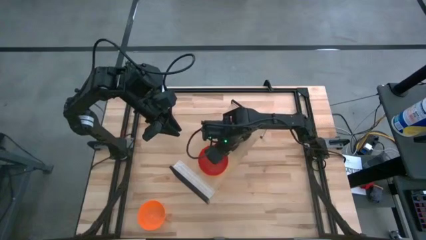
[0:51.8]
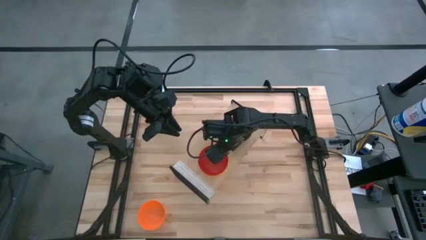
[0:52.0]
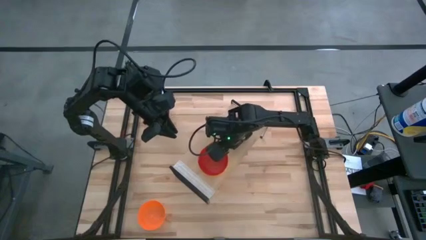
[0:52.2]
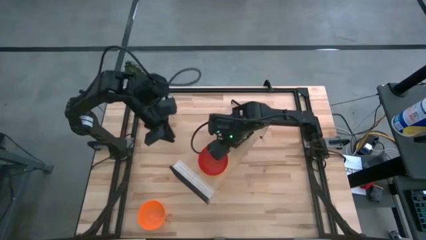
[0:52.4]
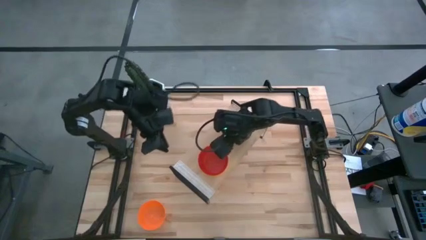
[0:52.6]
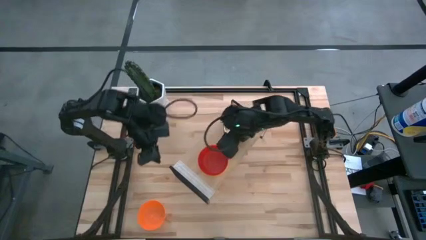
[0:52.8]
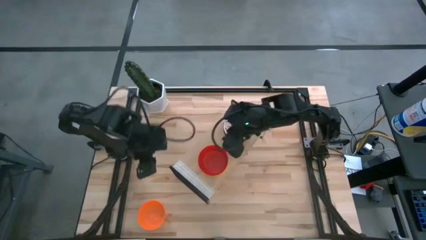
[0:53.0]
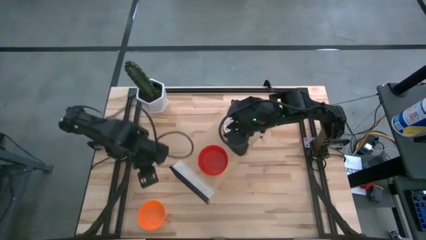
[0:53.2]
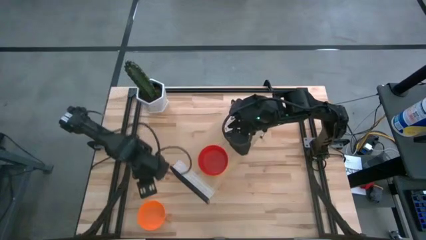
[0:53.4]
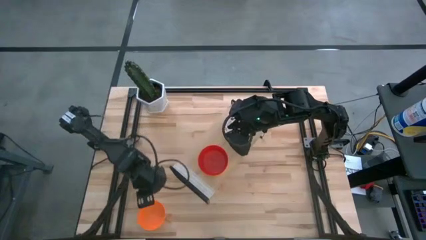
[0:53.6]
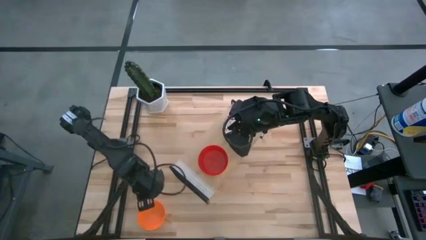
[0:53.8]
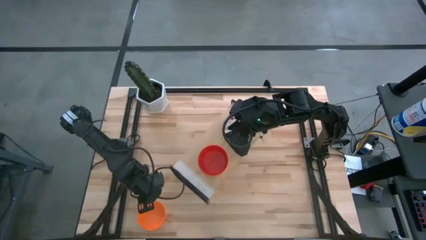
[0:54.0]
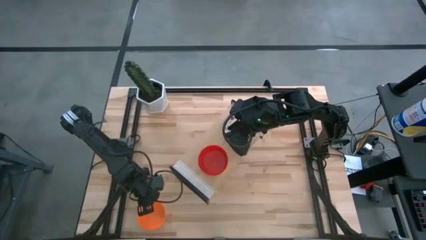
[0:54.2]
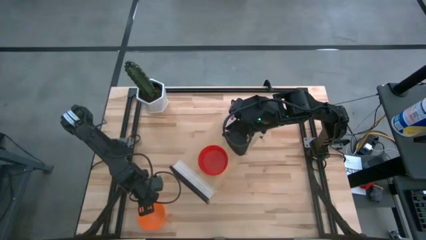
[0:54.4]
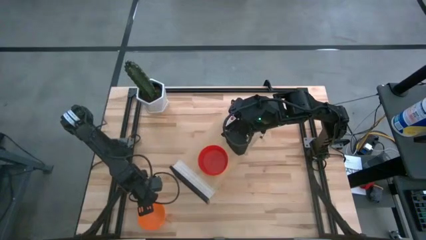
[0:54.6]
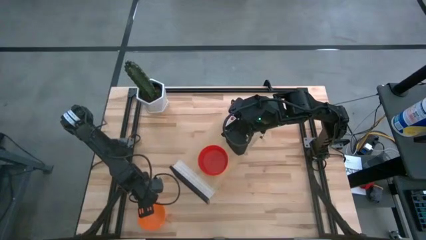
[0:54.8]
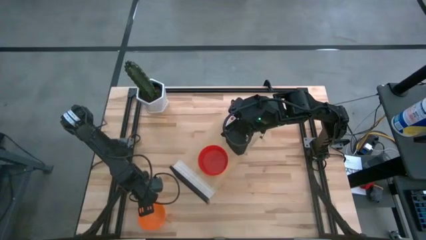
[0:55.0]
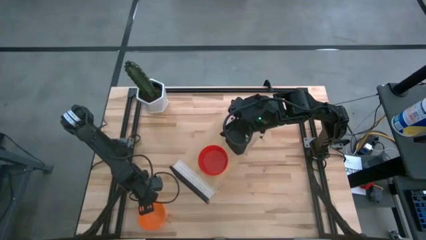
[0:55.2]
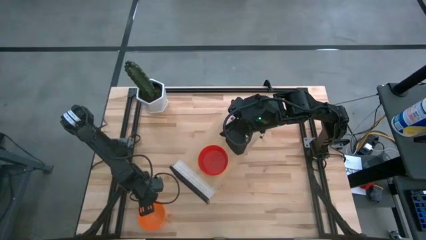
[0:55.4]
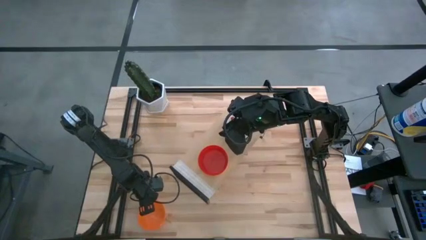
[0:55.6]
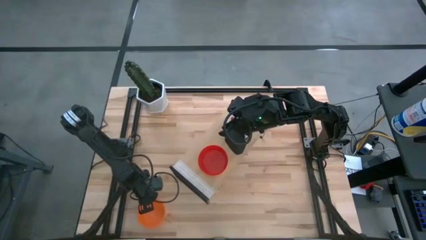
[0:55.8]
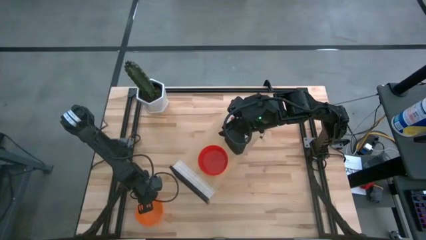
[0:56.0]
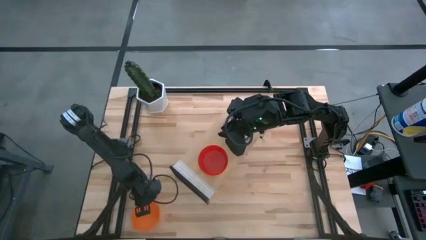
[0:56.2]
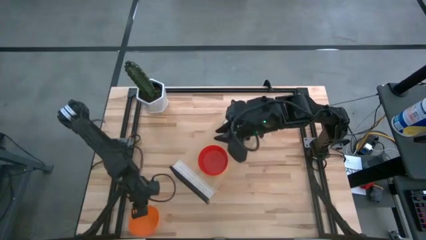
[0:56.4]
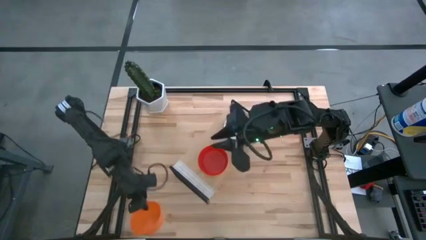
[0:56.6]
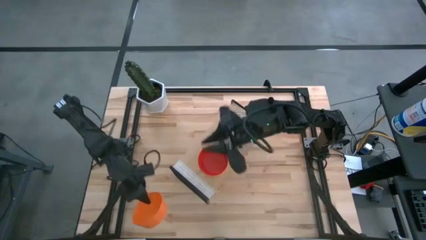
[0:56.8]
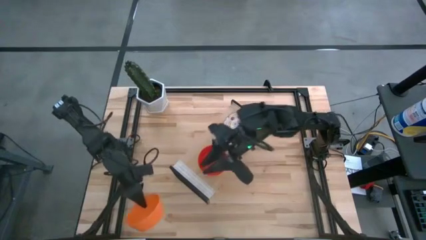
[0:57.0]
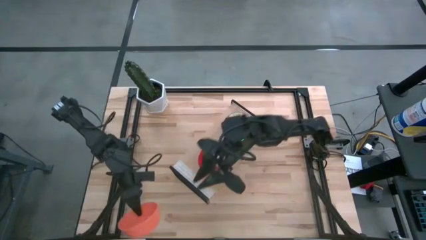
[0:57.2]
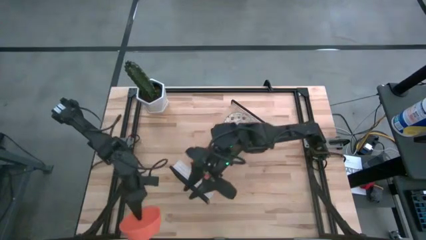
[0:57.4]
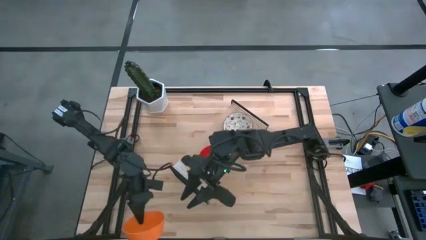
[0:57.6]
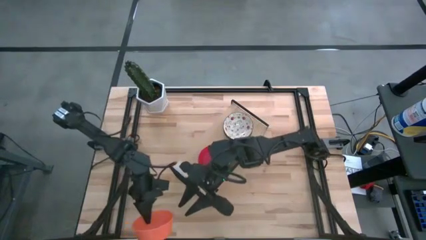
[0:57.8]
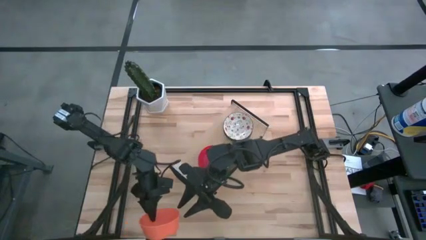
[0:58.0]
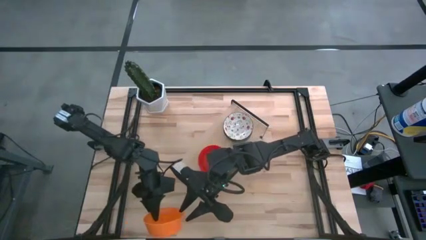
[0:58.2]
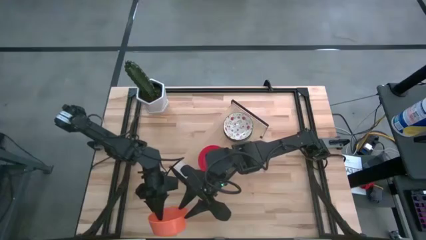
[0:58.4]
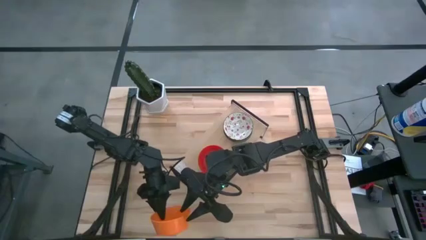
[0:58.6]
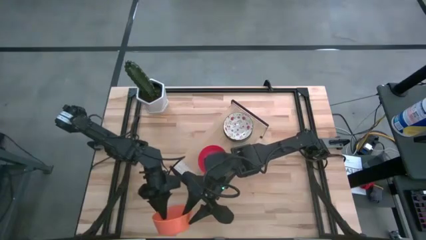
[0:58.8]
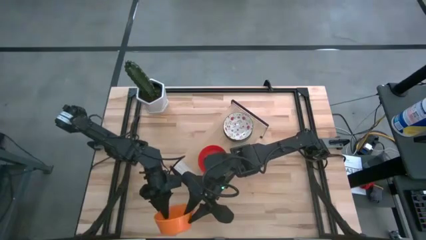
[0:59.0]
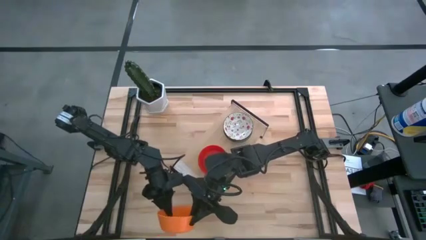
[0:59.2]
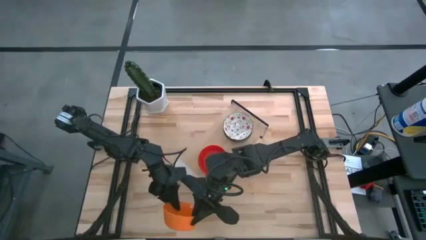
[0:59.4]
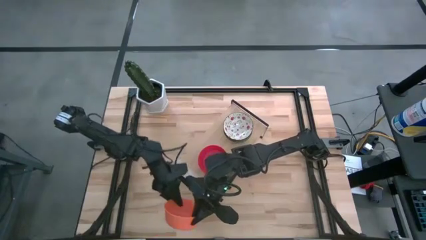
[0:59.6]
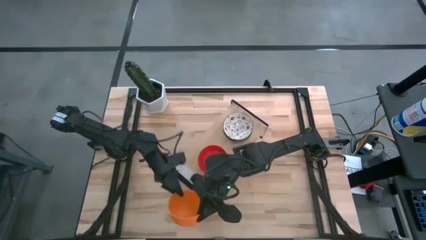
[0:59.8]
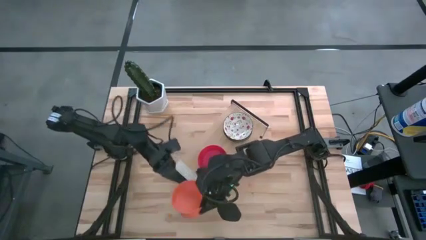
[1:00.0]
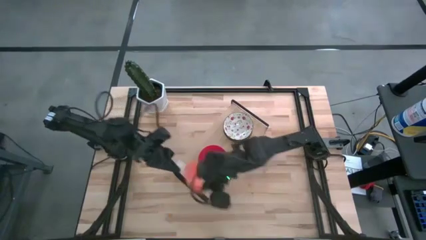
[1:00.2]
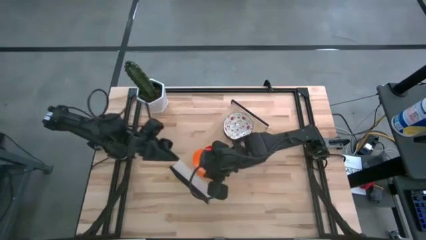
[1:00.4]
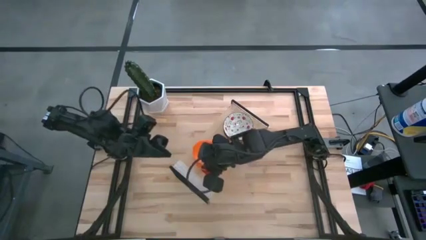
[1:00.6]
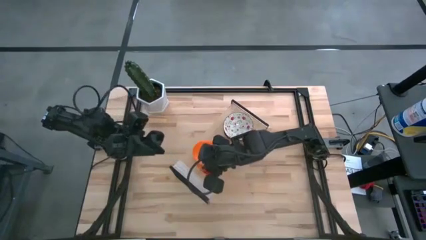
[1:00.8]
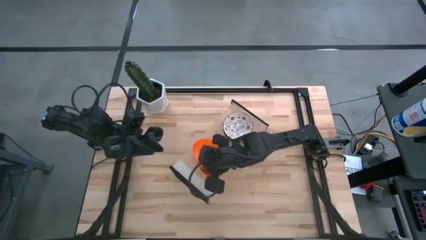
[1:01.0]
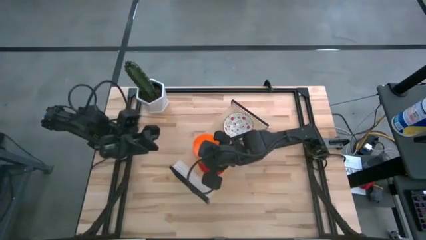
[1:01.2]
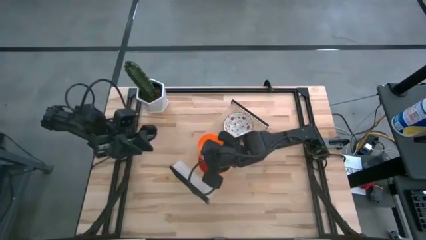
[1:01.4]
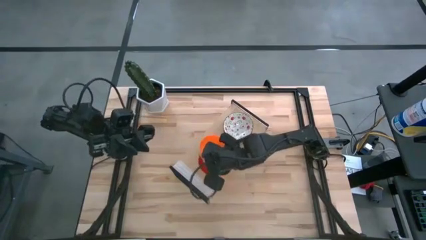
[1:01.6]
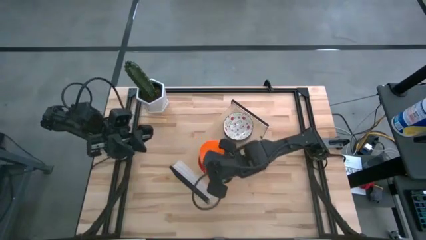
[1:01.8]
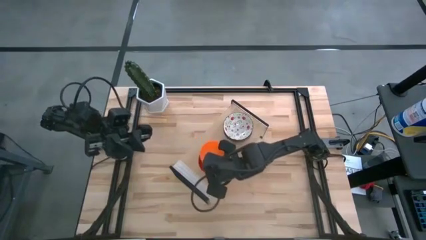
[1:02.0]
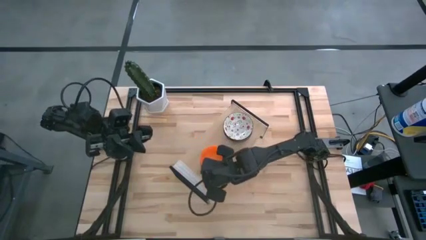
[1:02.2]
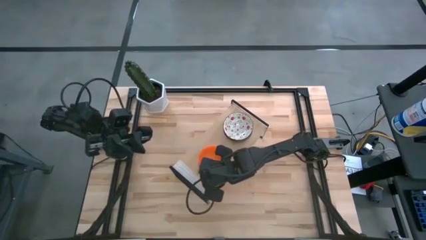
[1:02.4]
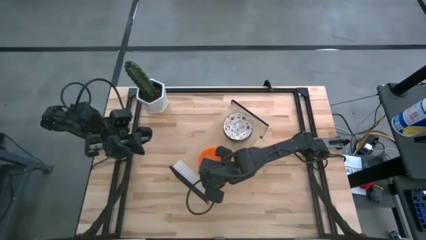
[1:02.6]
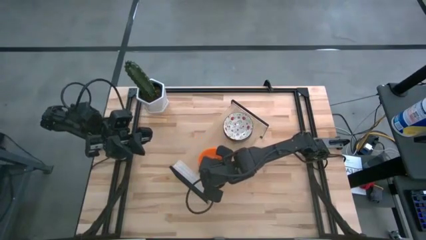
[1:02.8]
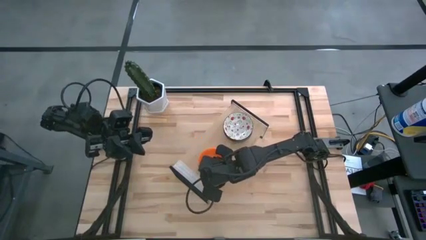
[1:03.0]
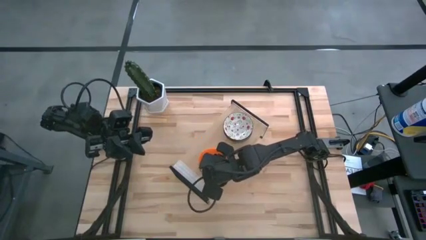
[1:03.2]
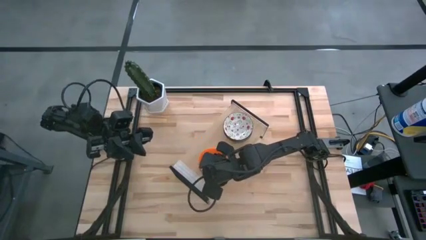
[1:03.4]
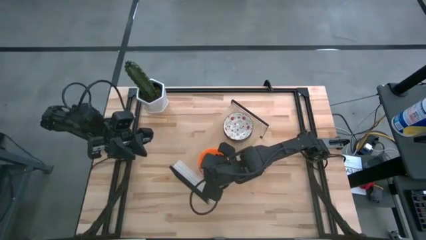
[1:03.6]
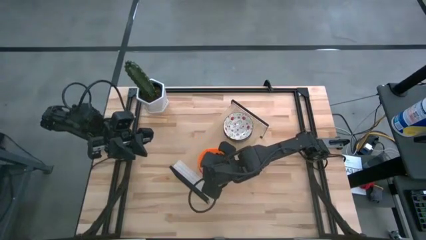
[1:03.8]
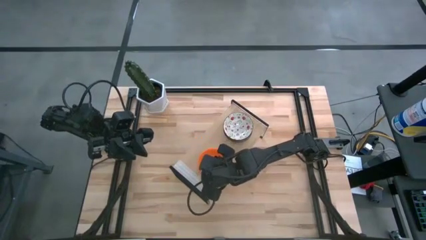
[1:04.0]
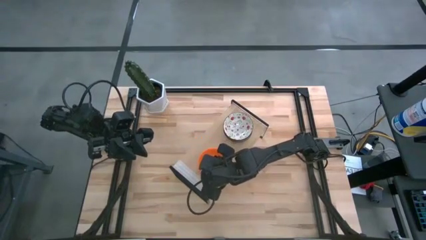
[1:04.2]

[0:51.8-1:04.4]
Task: Pick & Place Mini bowls
Stack the orange bowl on the red bowl on the shelf

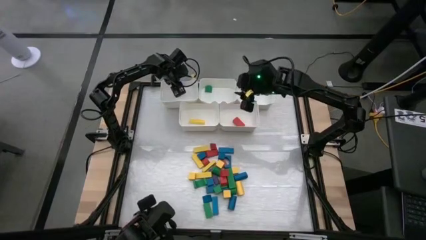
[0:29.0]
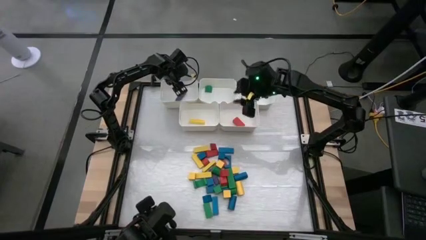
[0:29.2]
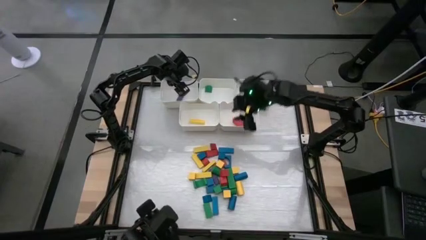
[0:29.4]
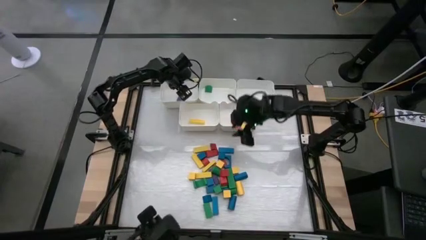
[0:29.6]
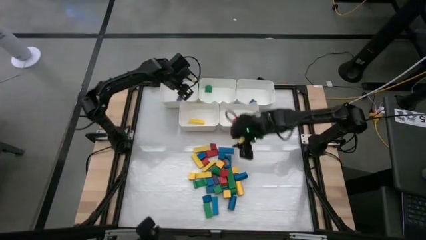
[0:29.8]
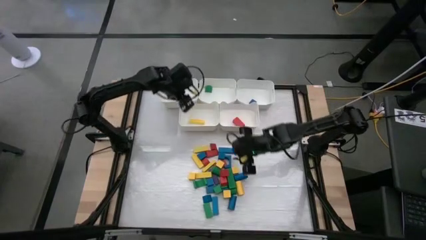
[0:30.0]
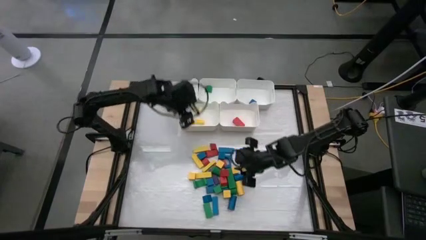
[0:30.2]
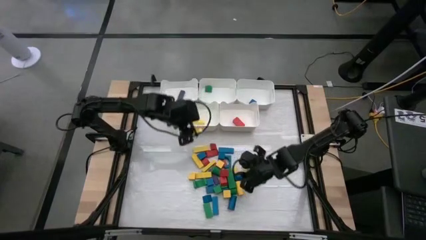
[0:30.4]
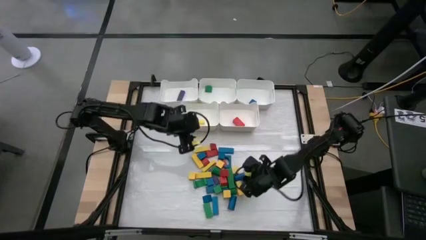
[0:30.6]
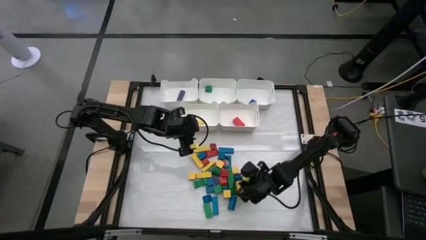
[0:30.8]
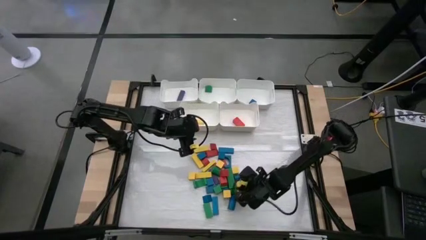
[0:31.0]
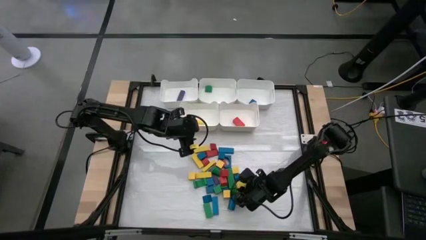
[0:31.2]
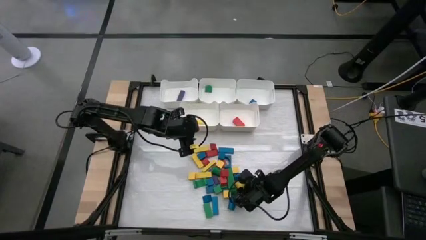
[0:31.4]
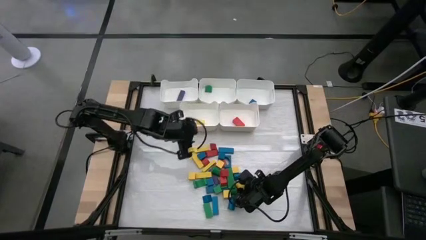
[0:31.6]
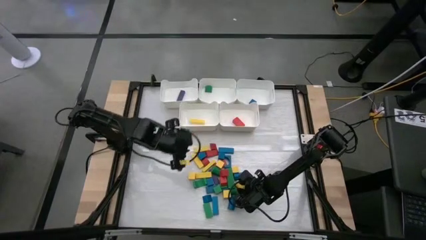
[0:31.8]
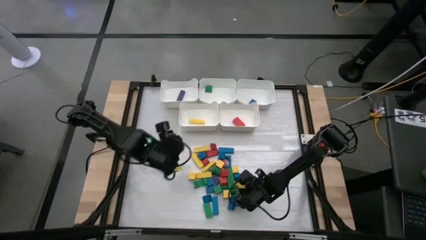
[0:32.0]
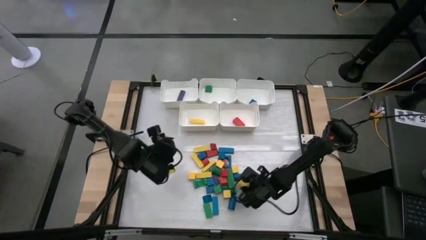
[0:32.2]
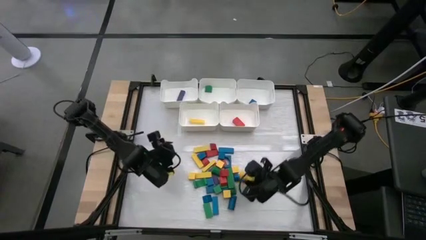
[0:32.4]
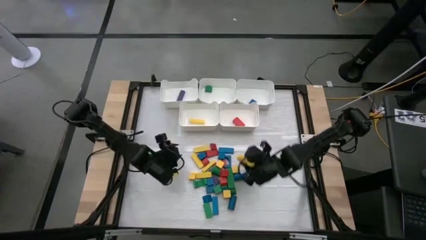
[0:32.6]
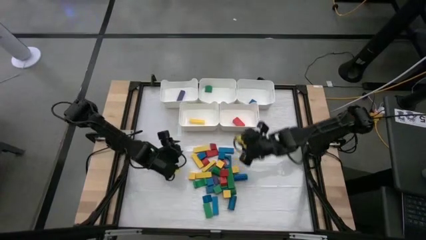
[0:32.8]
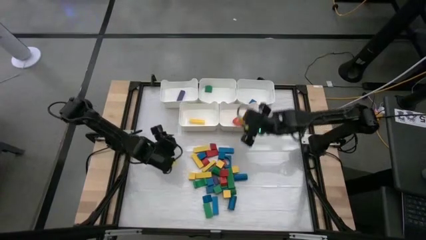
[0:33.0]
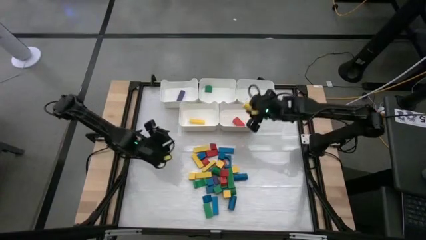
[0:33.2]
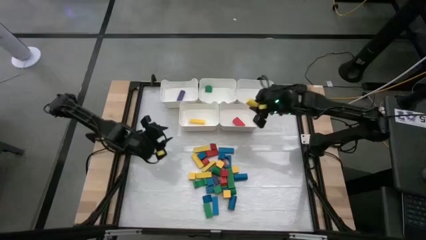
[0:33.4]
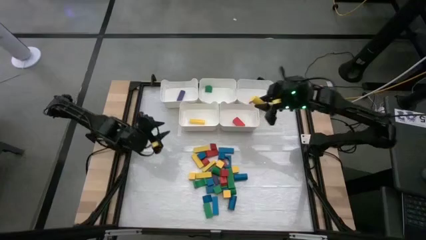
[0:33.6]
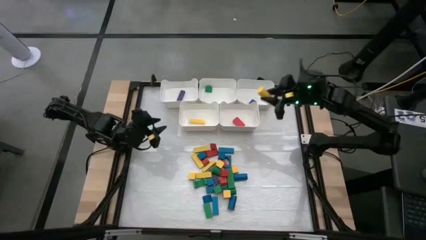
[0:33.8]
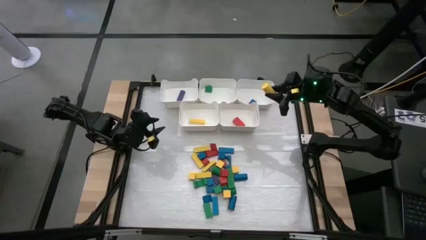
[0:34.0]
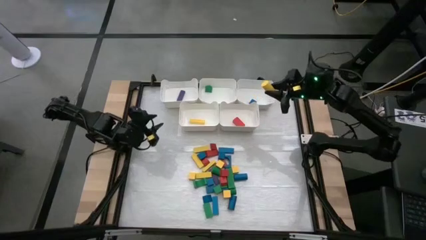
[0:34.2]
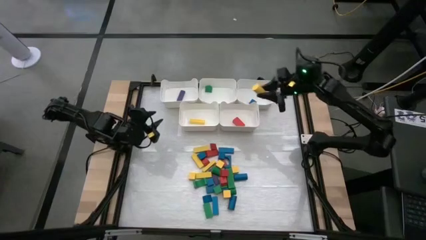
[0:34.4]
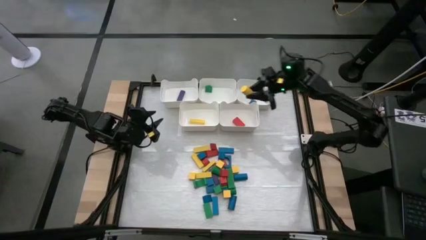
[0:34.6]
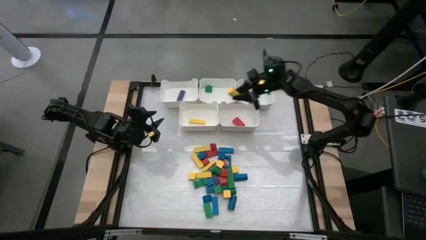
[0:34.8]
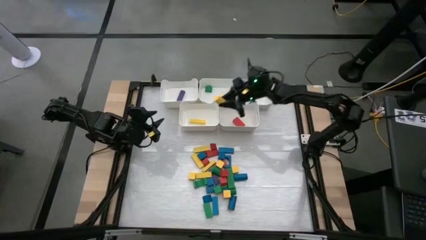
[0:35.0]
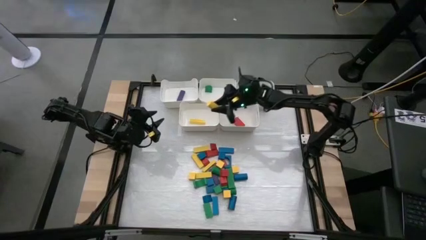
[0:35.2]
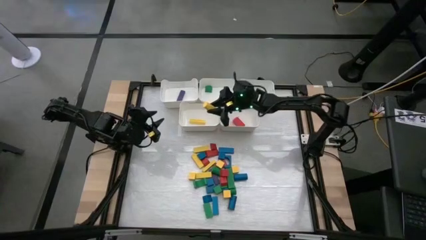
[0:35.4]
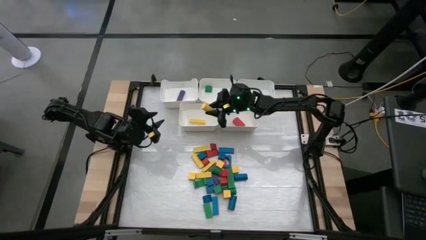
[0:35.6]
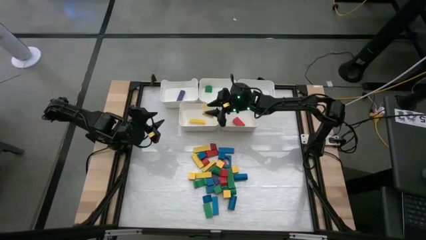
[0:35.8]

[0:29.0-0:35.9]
Task: Sort blocks
Put the yellow block into the bottom left bin
